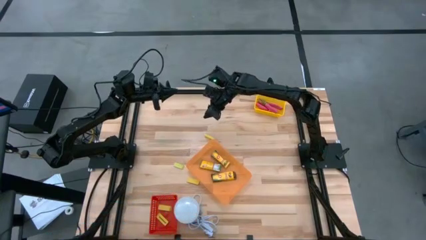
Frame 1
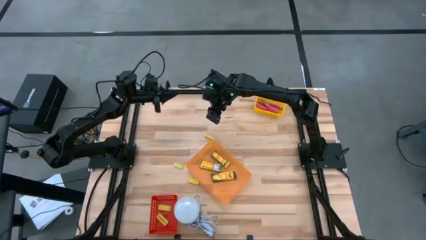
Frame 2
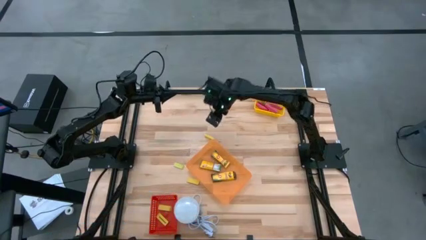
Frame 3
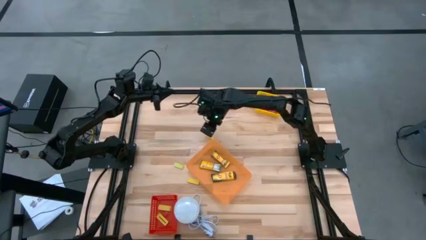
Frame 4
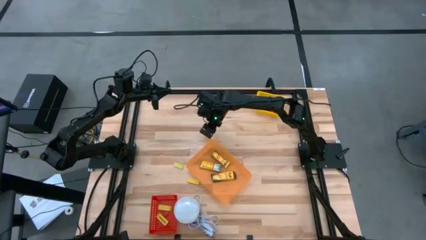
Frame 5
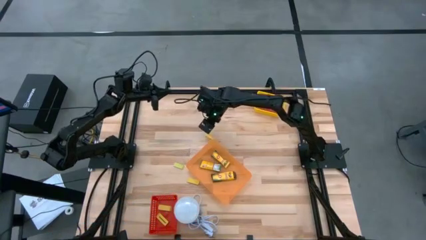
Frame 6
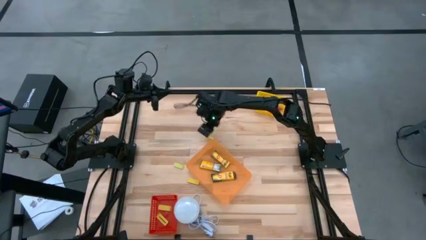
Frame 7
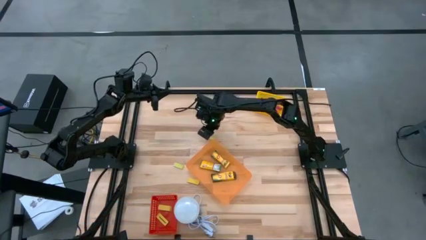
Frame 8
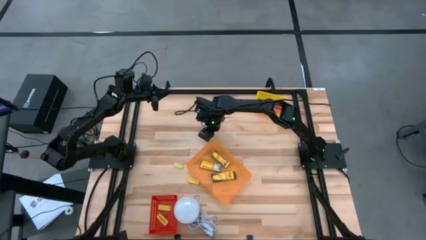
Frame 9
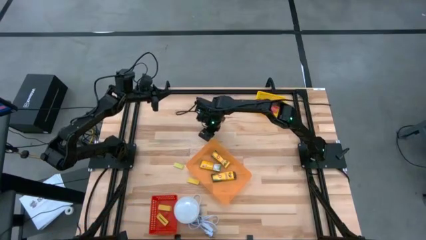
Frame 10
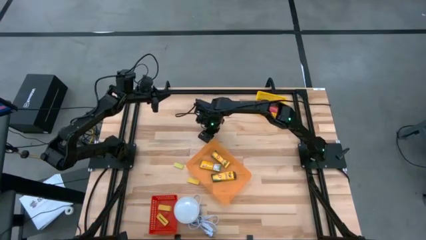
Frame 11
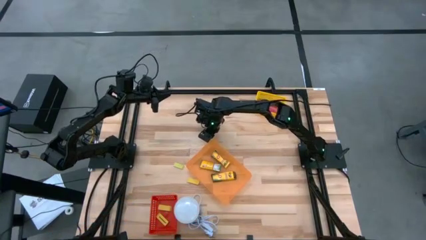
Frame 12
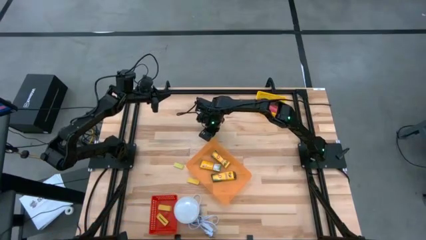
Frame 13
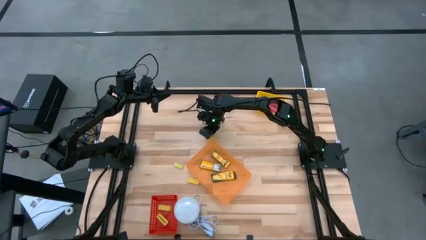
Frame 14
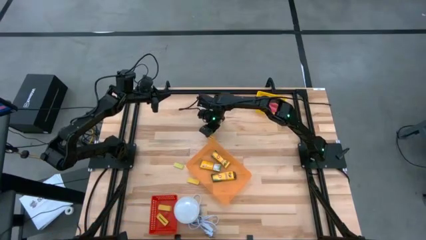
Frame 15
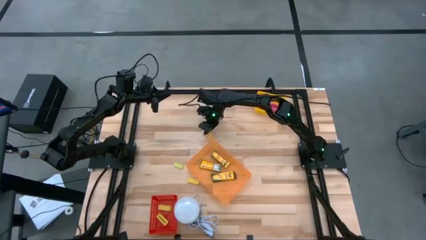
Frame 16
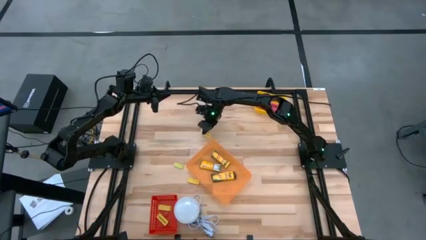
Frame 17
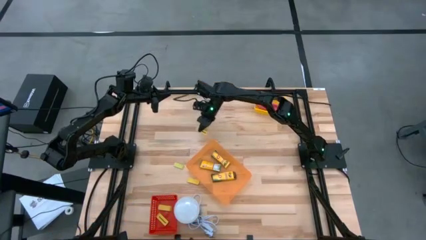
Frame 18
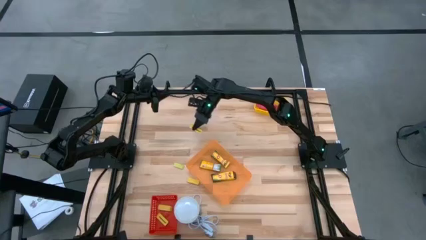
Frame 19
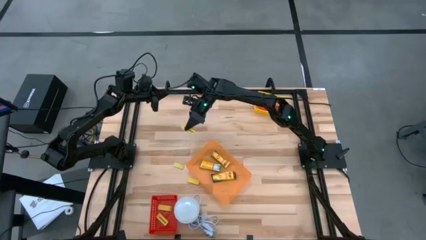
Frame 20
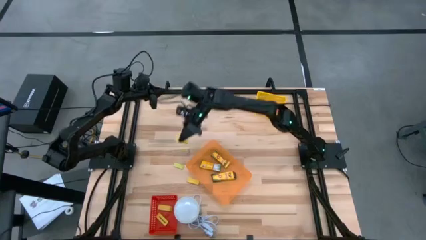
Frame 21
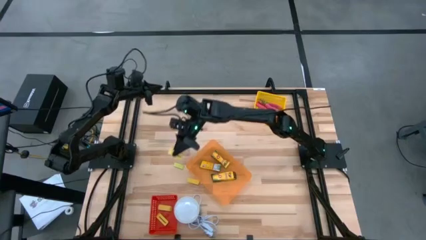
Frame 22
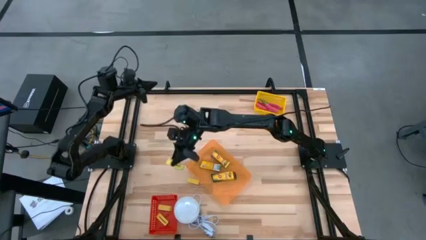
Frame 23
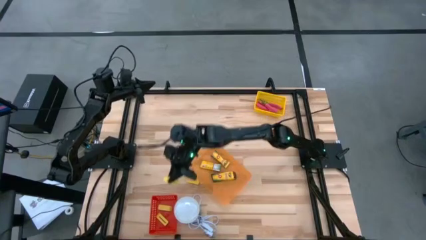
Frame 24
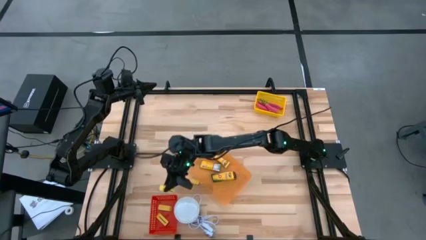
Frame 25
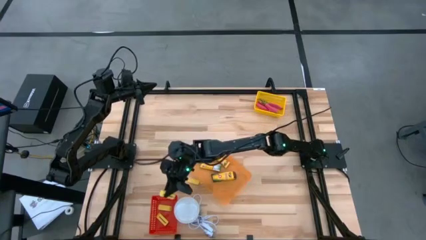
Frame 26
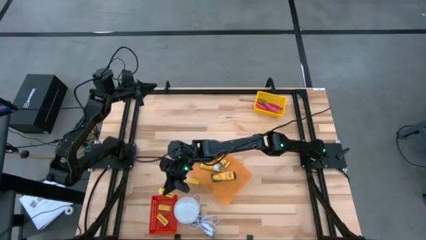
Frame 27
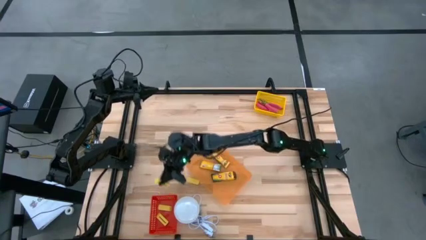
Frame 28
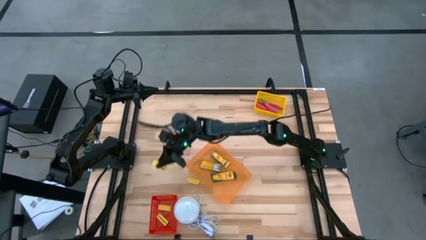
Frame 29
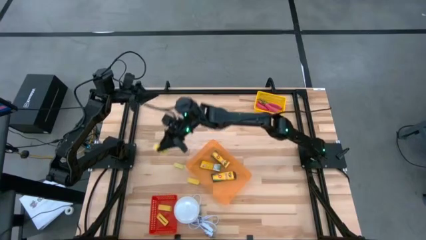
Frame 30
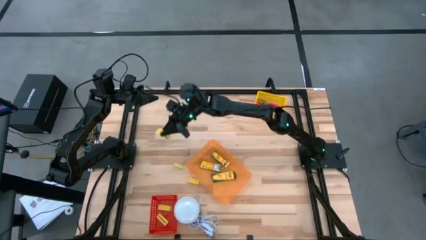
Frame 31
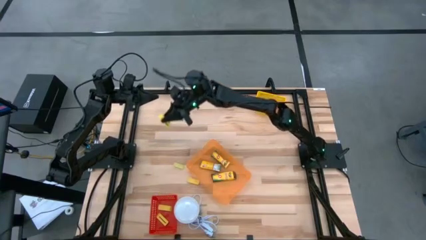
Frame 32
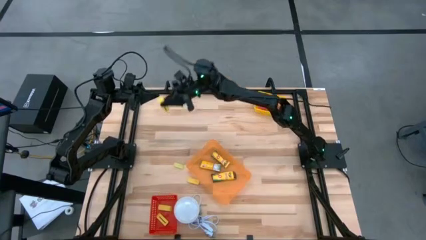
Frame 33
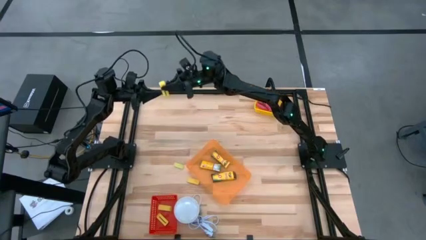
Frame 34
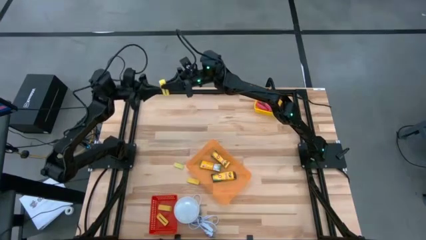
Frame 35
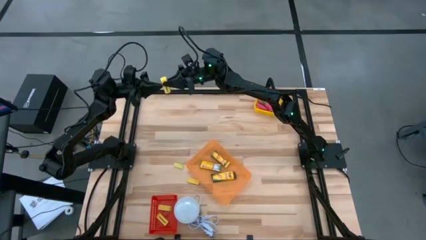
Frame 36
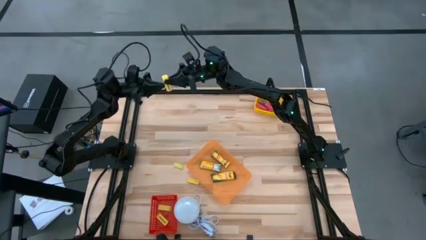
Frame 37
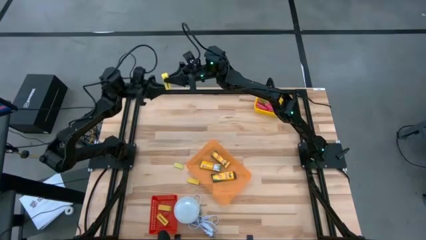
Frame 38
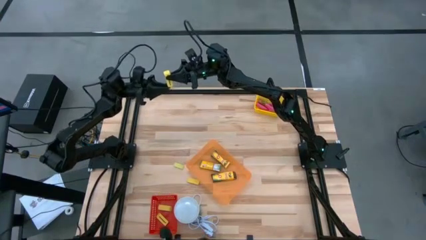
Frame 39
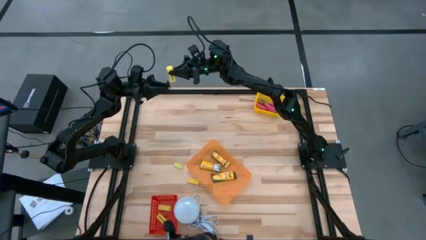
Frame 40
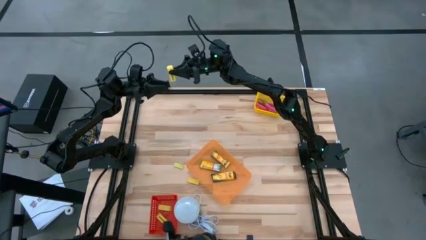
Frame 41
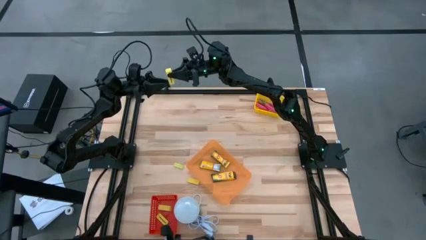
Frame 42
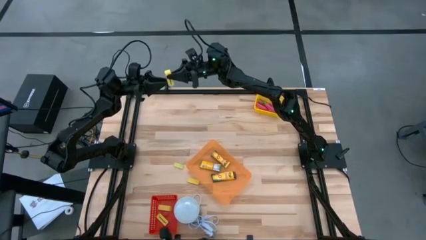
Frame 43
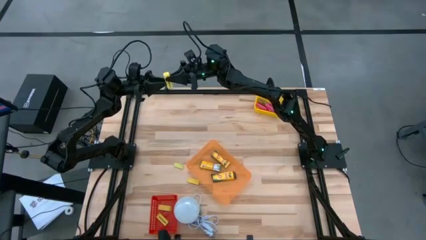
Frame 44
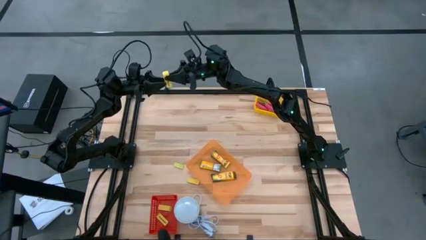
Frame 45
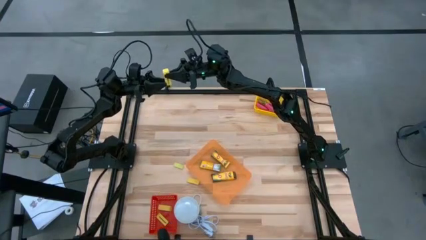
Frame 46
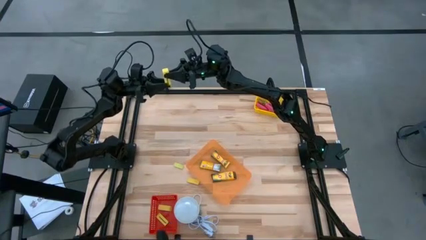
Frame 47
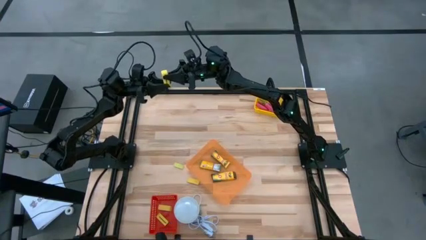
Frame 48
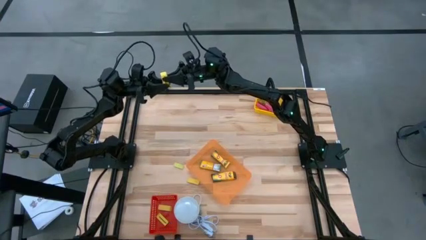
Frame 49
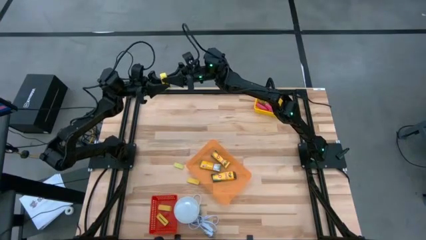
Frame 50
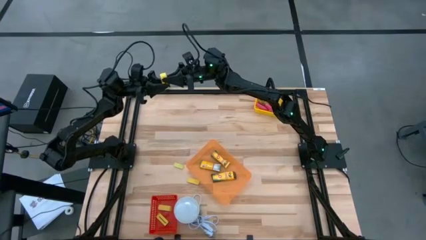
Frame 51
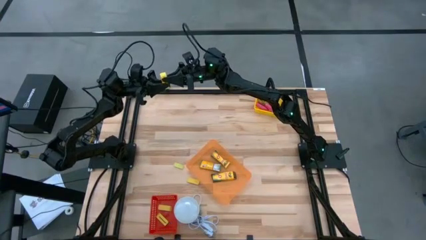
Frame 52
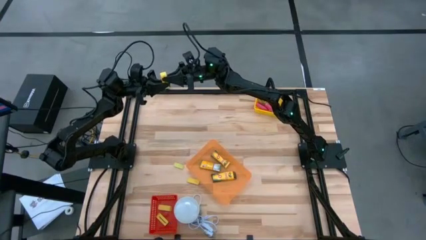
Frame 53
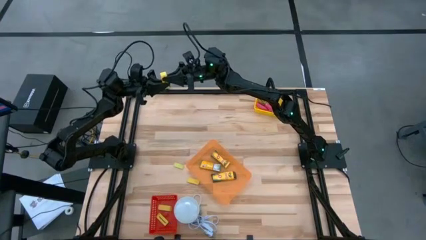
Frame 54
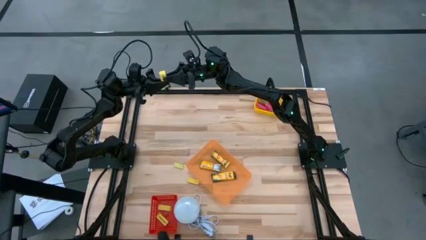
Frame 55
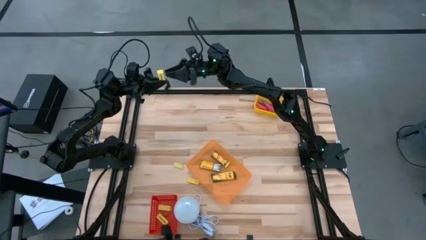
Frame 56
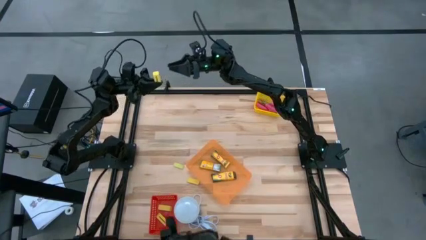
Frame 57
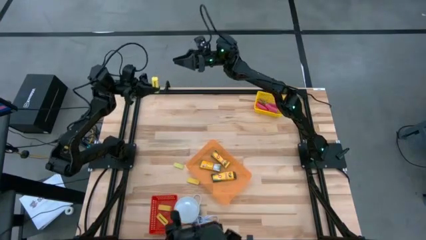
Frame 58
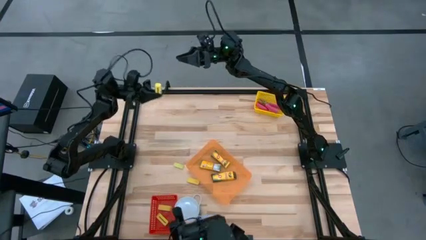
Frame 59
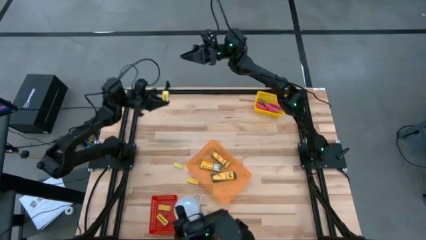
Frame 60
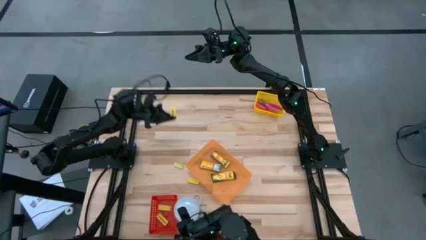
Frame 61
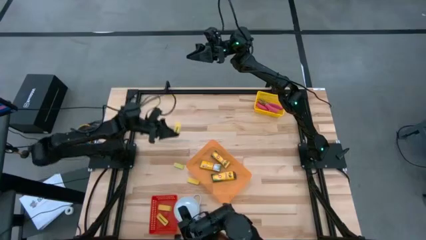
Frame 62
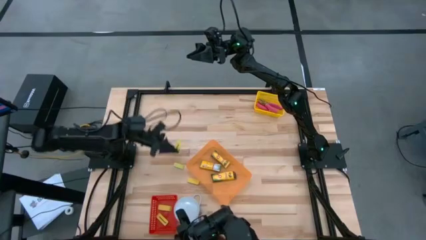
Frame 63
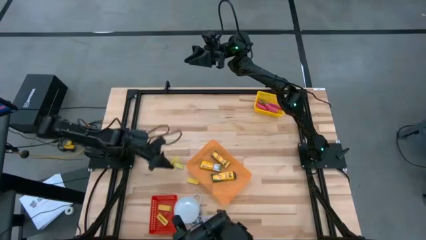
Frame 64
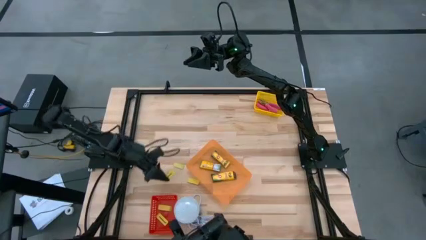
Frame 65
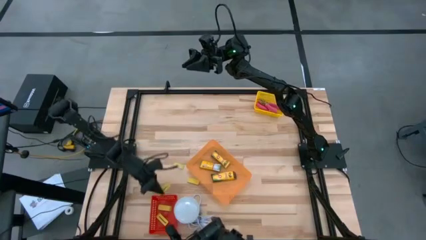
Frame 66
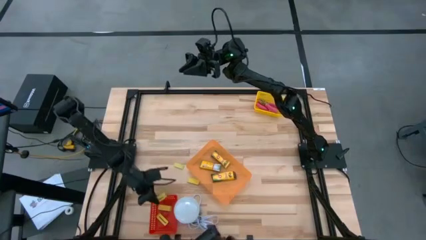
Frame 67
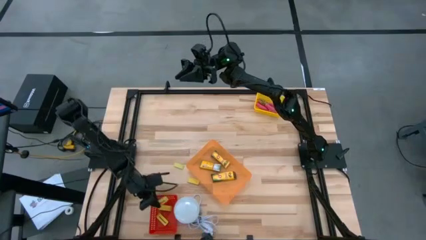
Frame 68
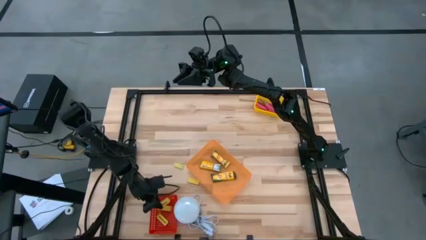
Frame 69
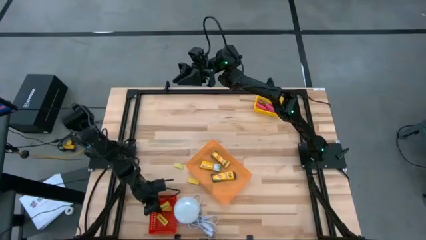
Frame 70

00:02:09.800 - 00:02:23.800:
Task: Pick & Place School Supplies
Put the yellow eraser into the red bin
